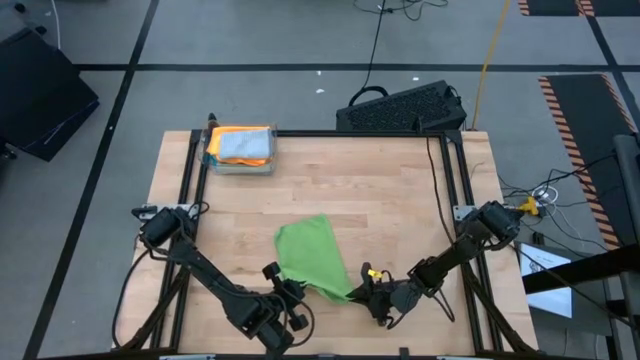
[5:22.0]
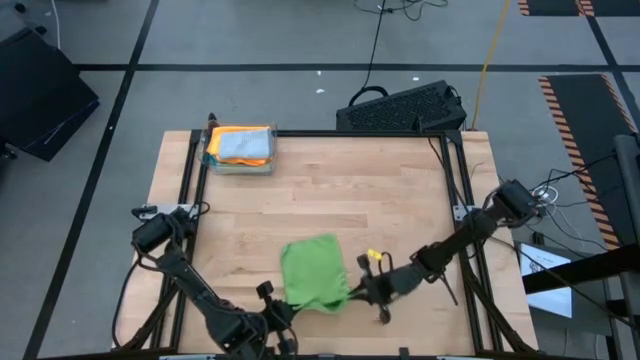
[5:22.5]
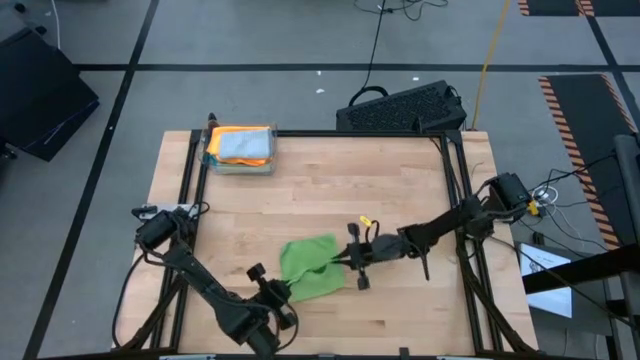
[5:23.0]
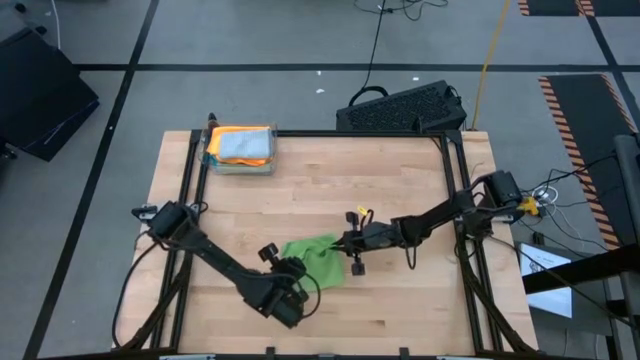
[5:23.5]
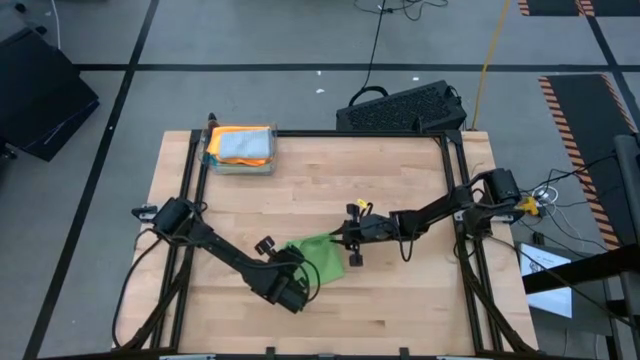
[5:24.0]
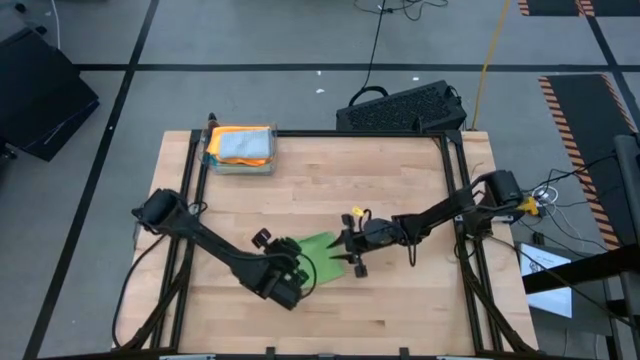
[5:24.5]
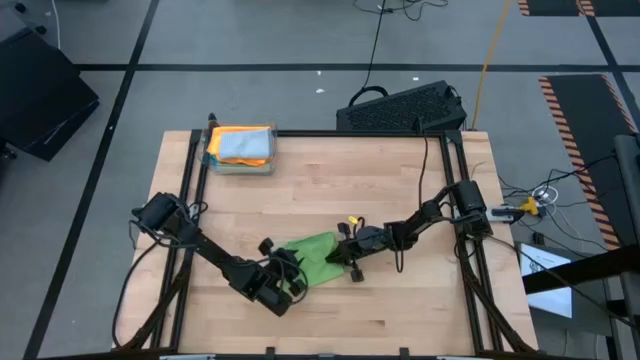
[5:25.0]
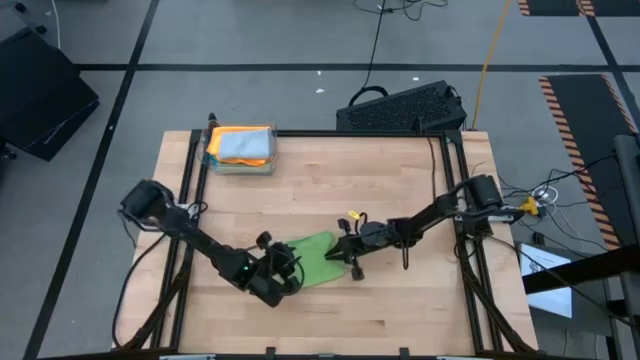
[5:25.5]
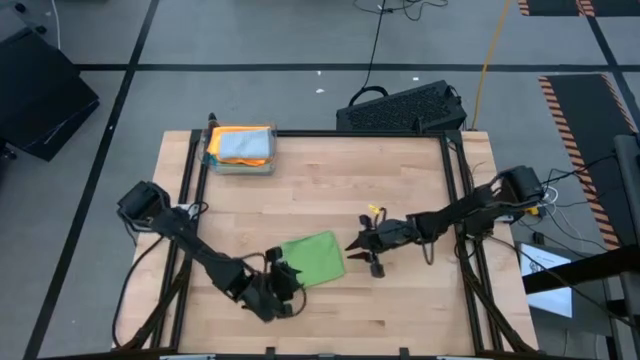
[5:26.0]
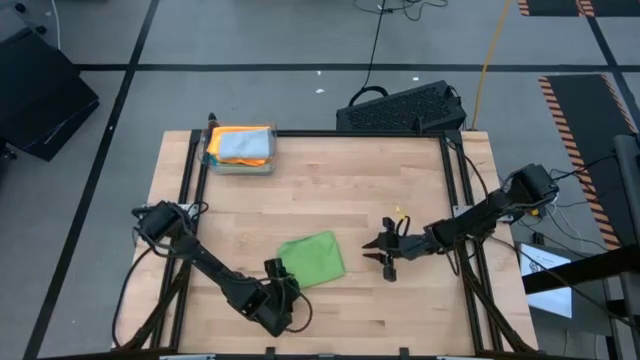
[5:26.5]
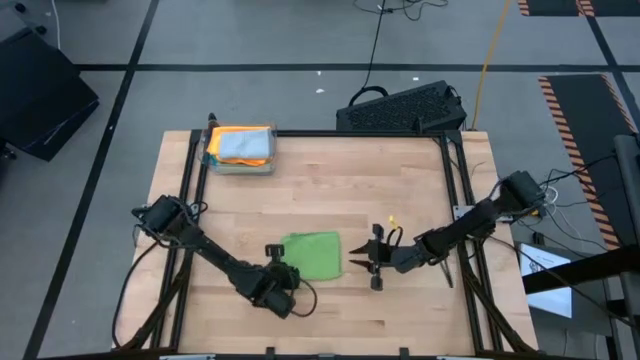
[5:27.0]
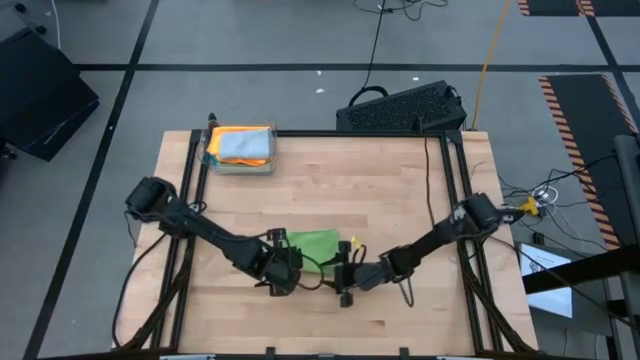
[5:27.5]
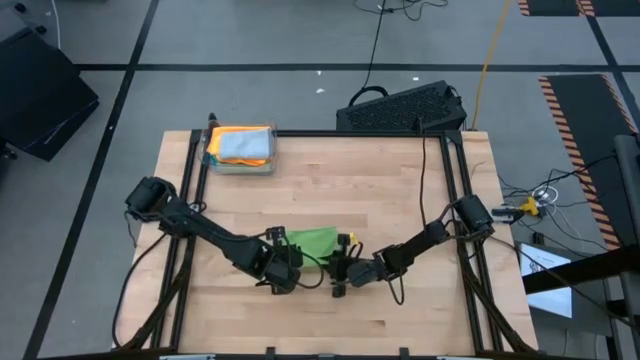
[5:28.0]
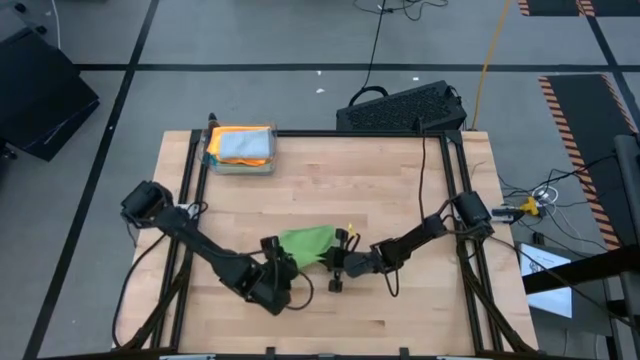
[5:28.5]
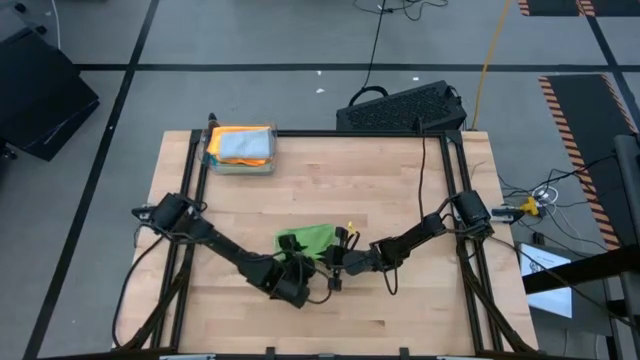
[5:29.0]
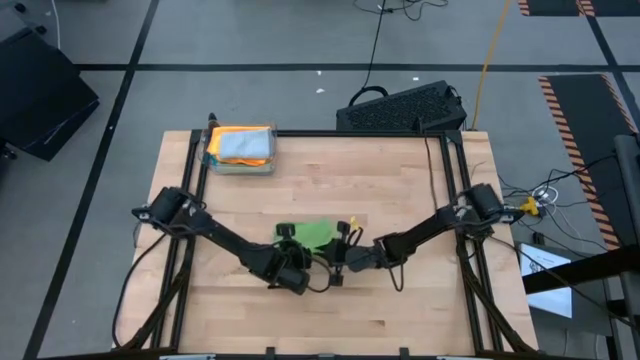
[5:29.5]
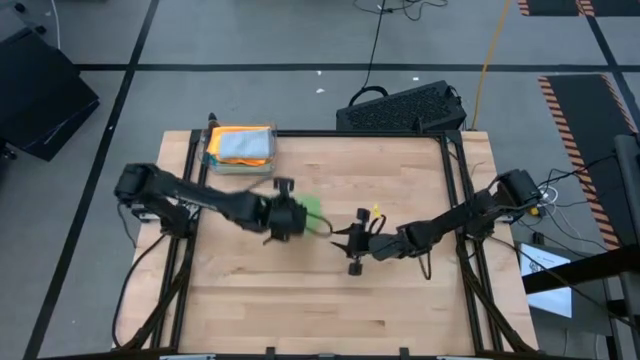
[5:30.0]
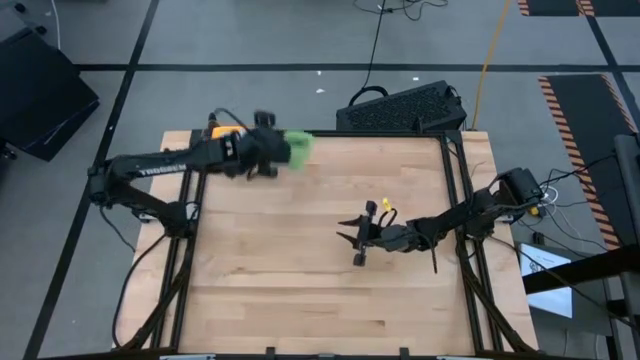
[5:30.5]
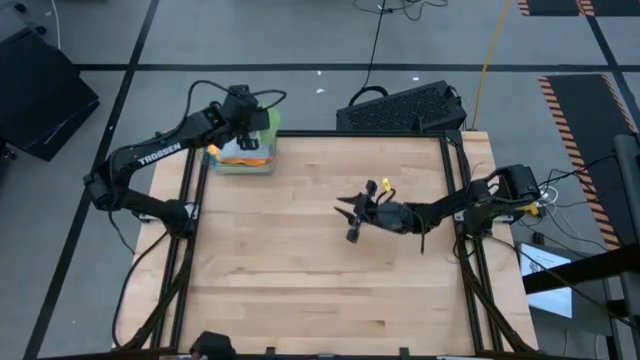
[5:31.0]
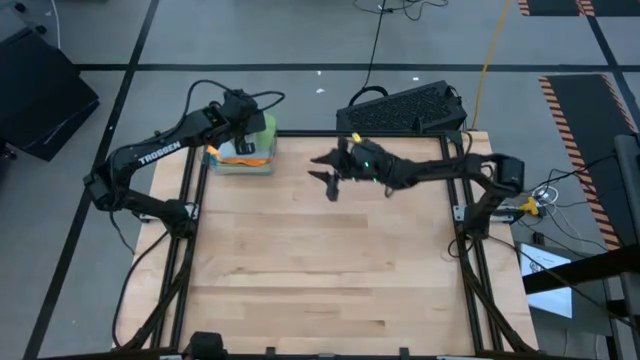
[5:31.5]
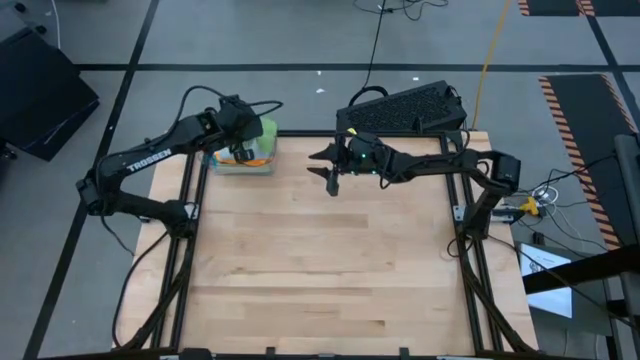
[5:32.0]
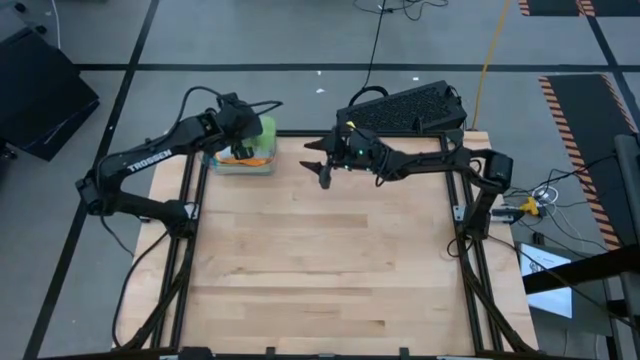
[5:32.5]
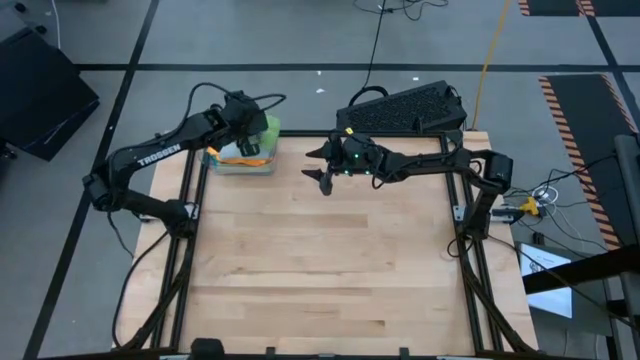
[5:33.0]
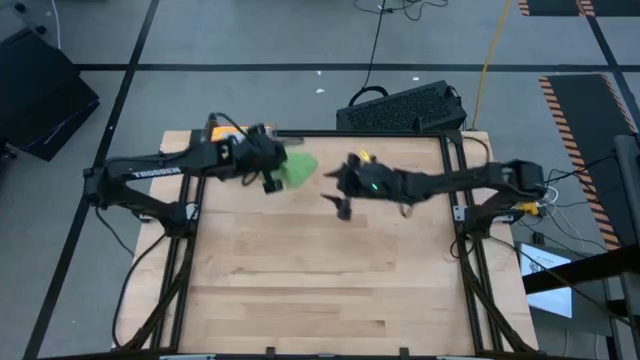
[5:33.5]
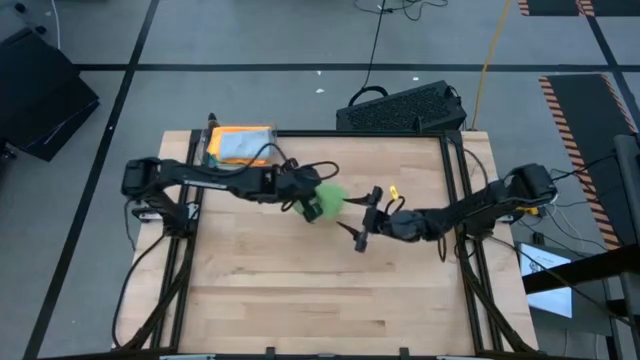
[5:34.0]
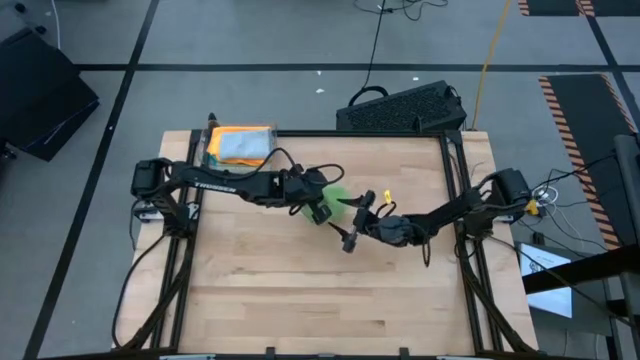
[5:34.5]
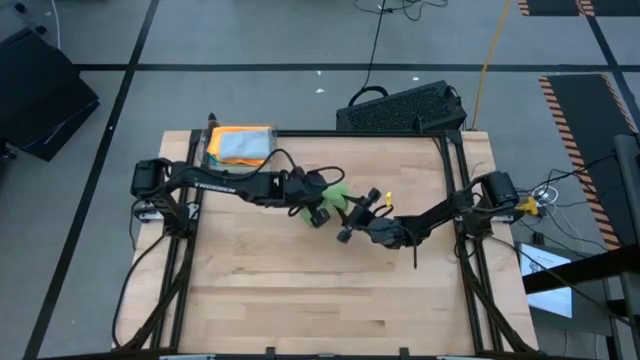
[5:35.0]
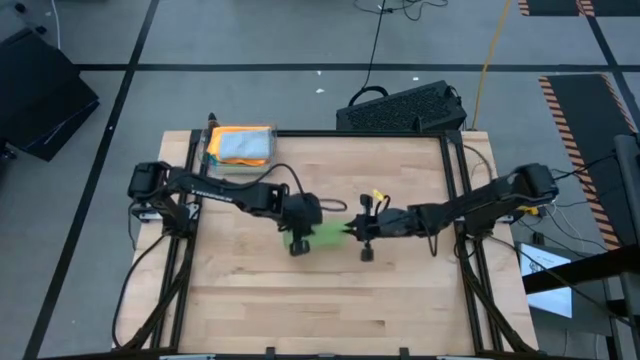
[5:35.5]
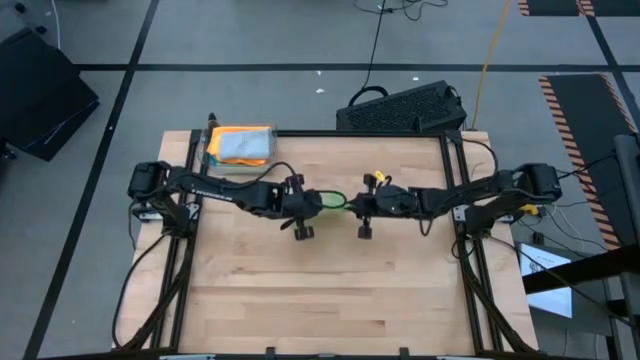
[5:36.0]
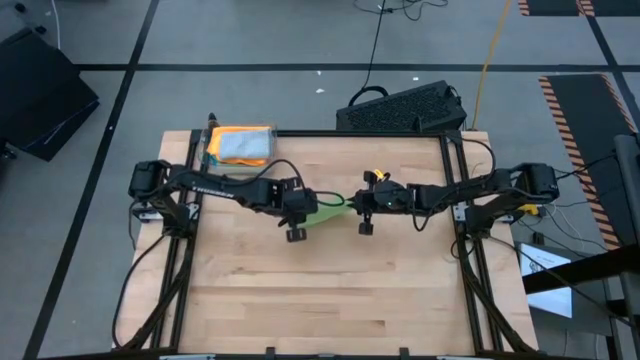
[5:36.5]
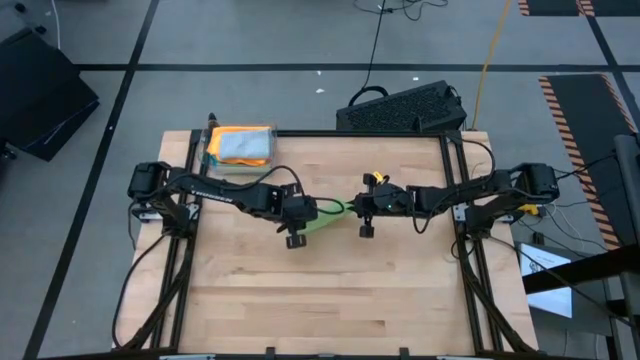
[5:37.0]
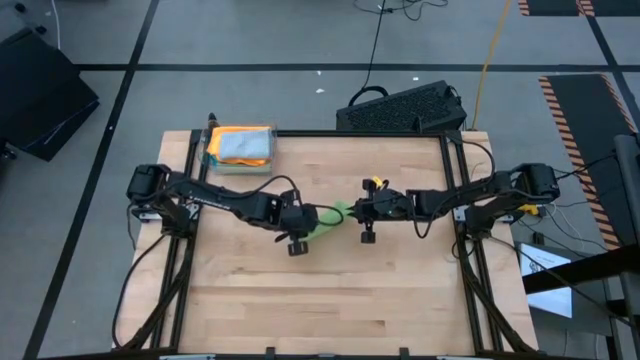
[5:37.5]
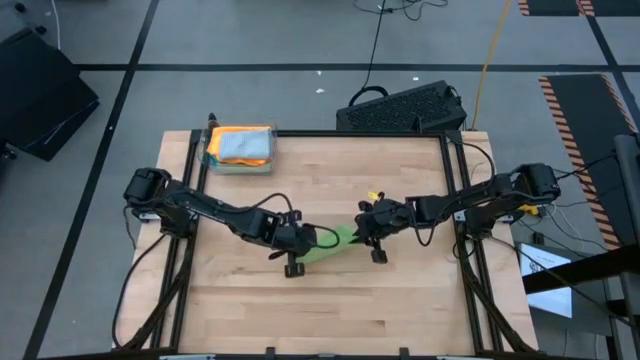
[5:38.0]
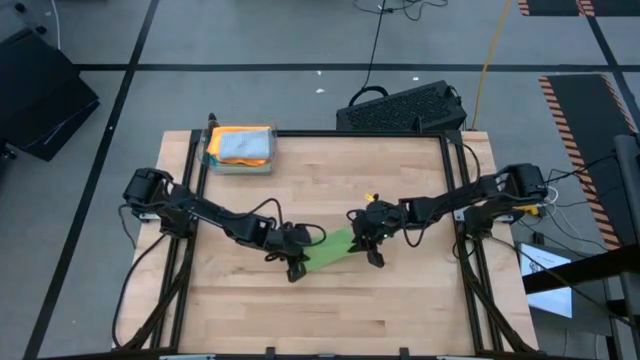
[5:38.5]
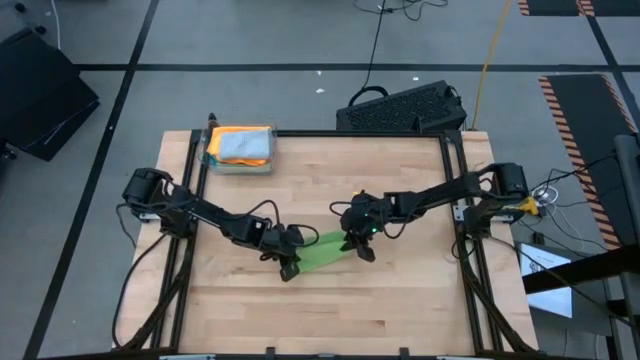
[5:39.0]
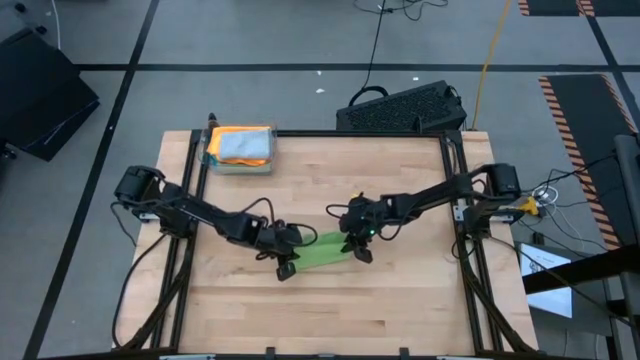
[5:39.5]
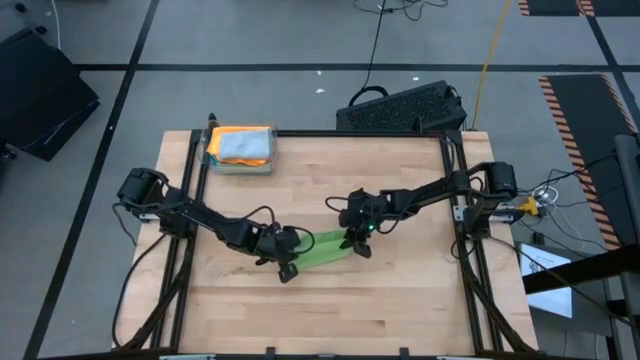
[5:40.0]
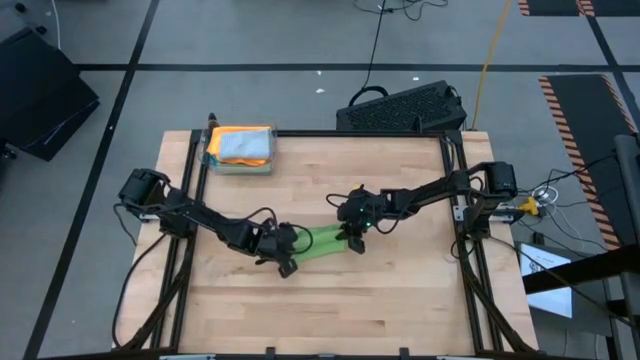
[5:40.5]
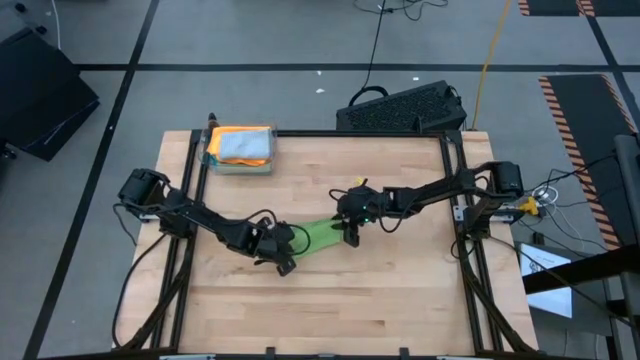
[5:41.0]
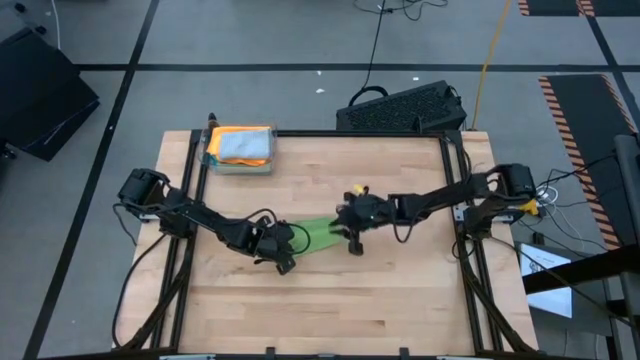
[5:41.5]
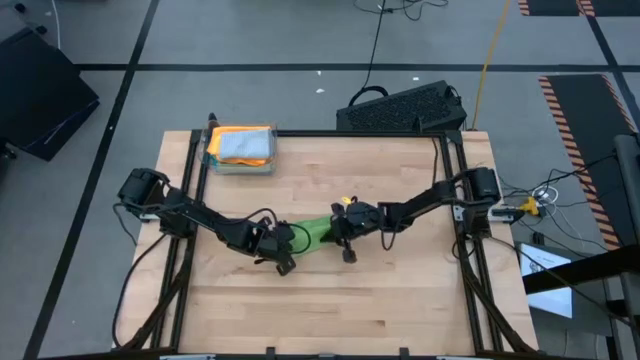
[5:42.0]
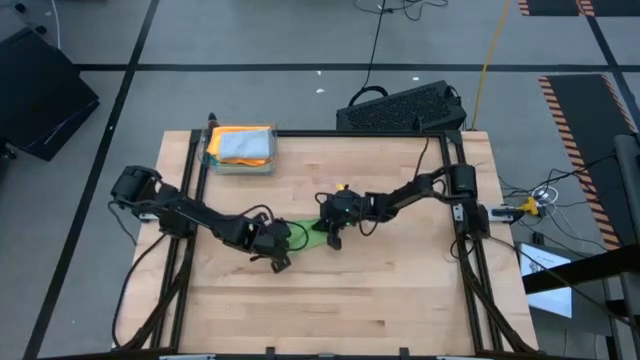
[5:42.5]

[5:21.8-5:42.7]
Task: Fold microfiber towels
Fold the green microfiber cloth
